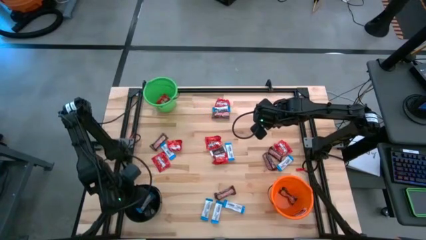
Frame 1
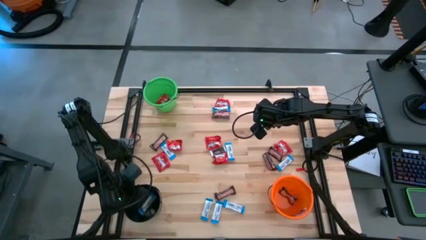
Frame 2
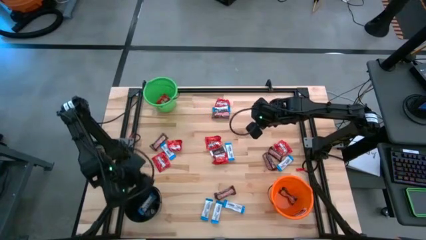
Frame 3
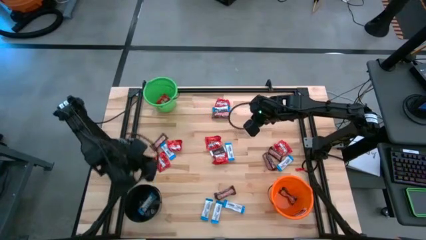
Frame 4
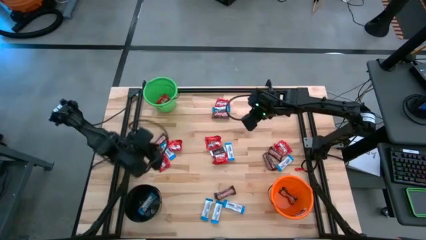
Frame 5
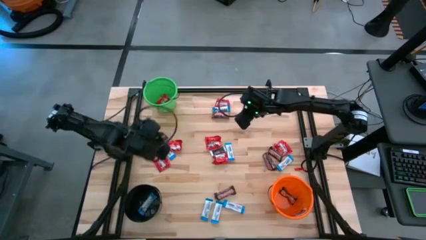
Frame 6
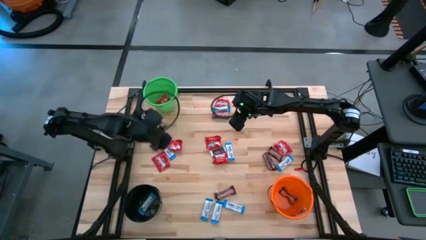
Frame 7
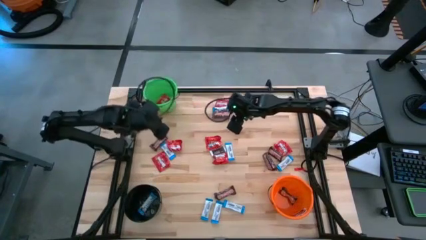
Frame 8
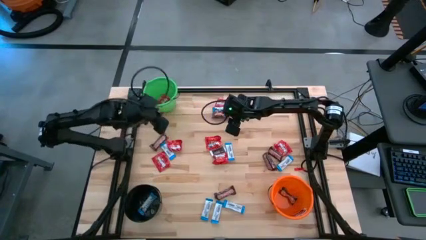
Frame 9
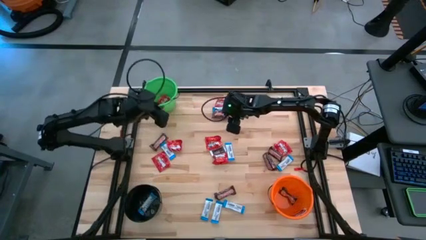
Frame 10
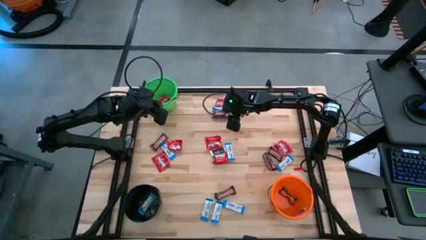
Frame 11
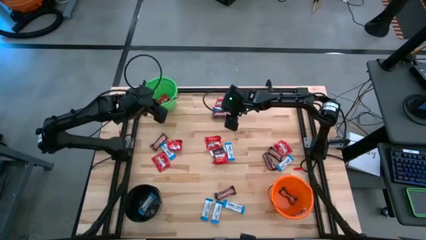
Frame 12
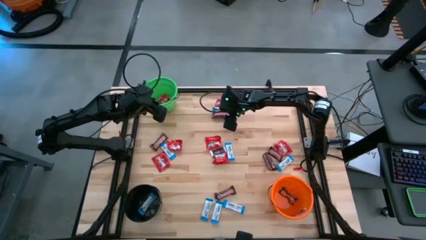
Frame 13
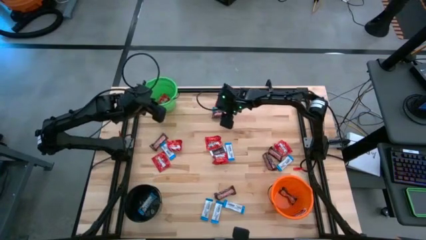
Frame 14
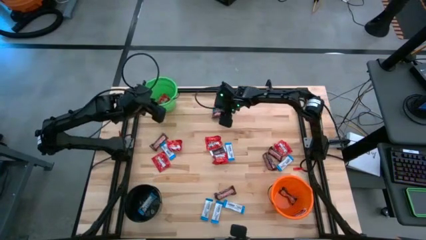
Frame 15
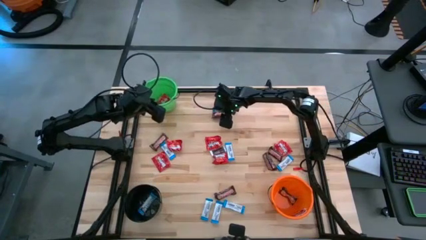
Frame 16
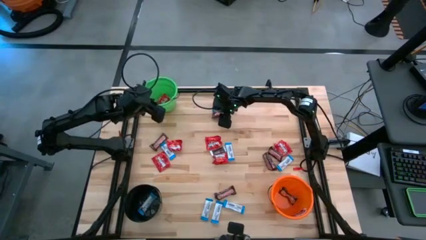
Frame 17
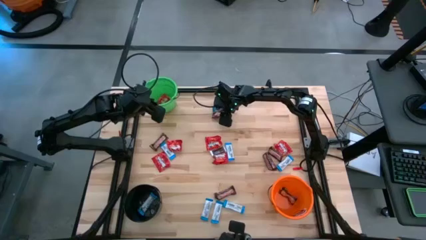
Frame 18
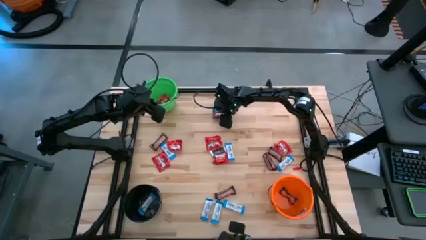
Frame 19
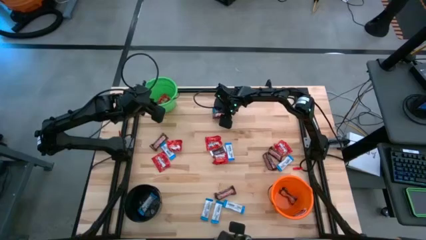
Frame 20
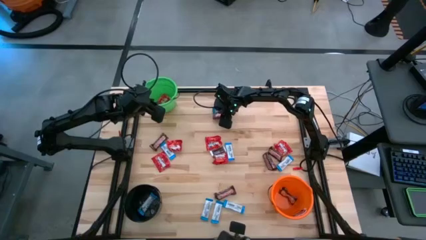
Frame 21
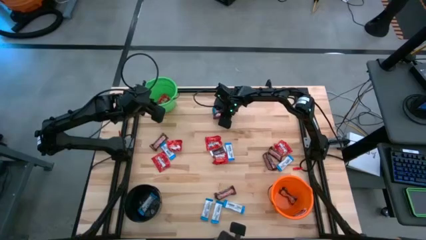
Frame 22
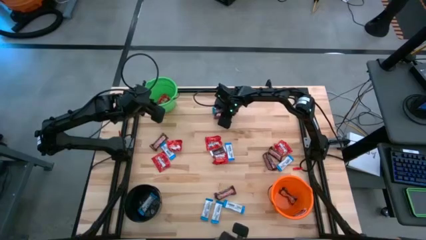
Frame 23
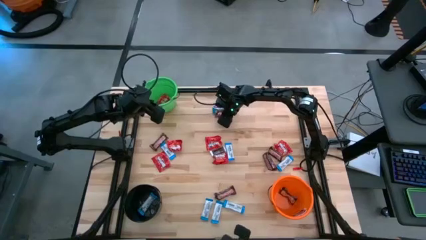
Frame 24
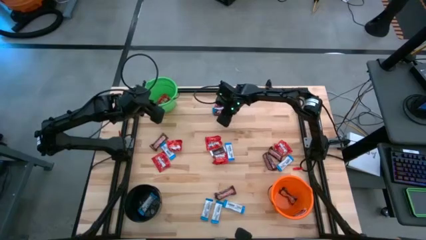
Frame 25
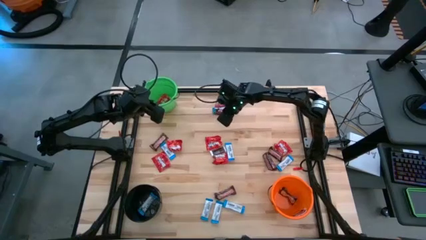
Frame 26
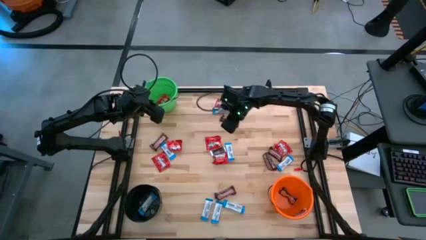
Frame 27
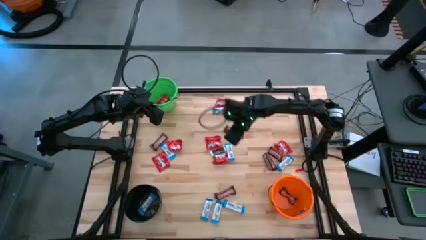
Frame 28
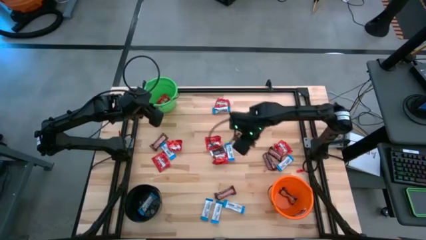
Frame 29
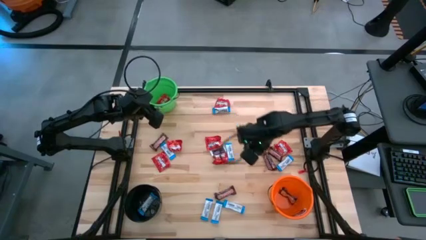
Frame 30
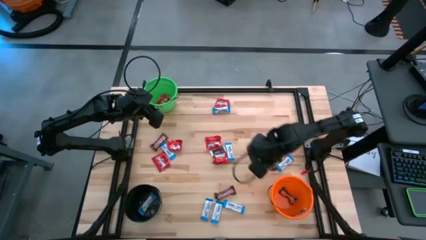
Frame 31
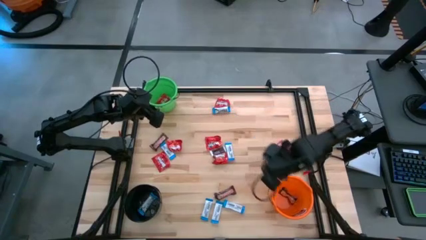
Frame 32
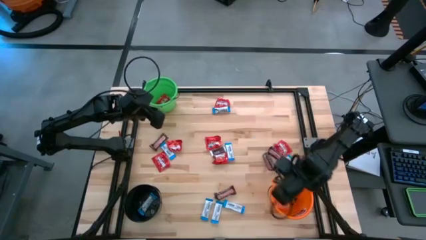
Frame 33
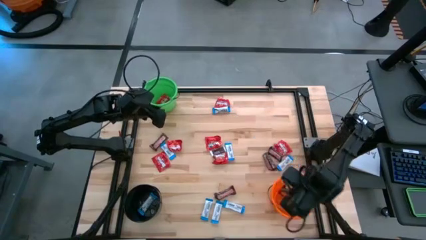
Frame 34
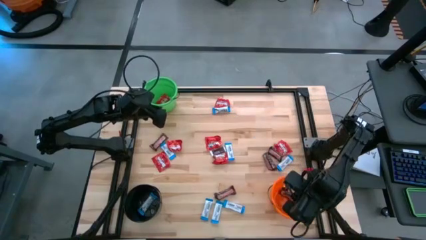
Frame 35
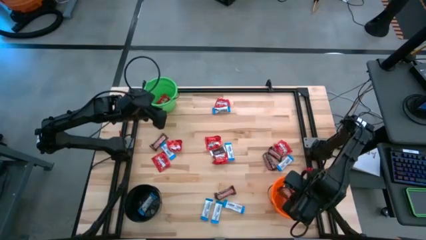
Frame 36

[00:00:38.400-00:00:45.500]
Task: Sort candy
Put the brown chocolate into the orange bucket

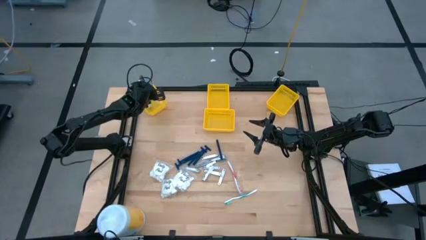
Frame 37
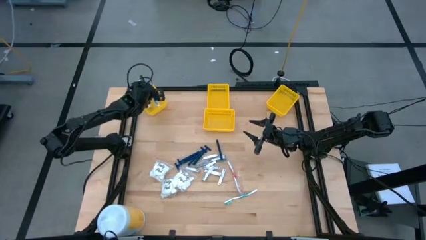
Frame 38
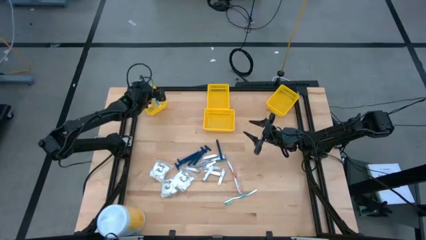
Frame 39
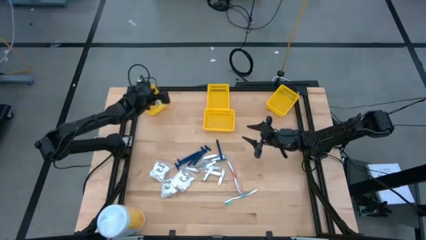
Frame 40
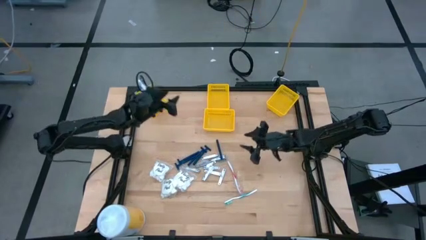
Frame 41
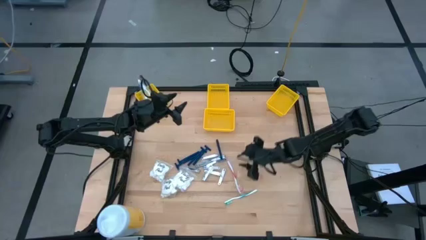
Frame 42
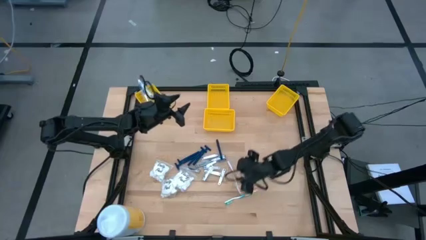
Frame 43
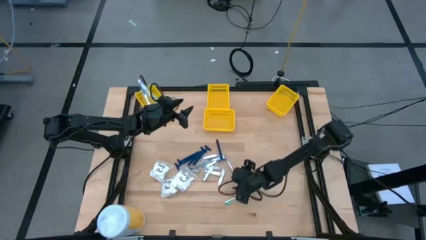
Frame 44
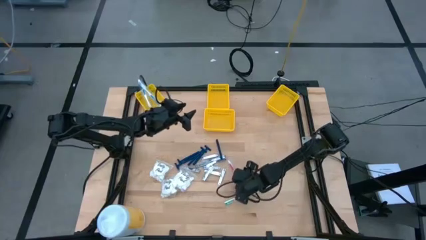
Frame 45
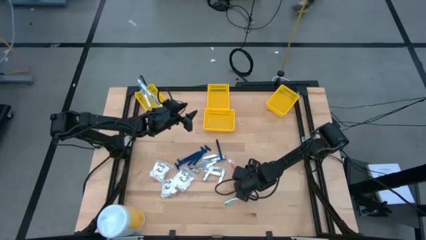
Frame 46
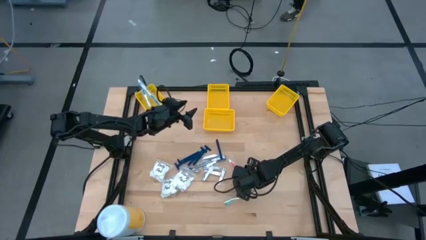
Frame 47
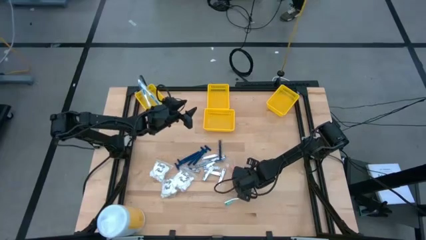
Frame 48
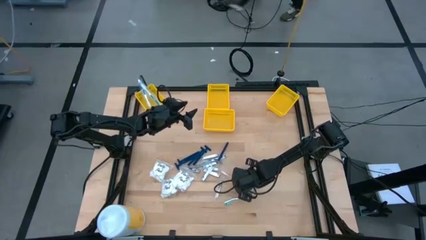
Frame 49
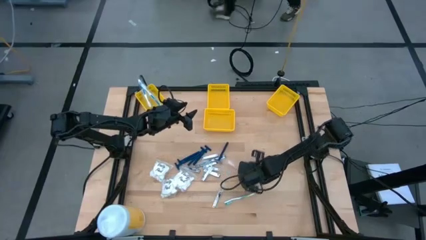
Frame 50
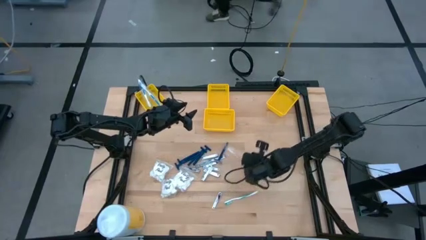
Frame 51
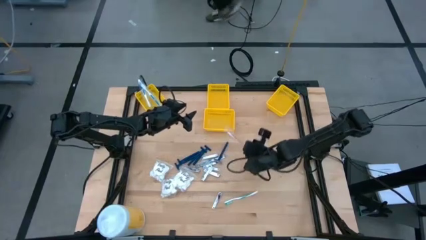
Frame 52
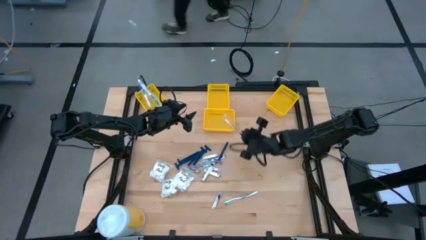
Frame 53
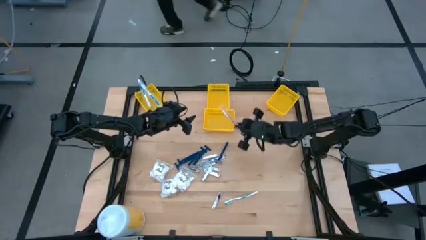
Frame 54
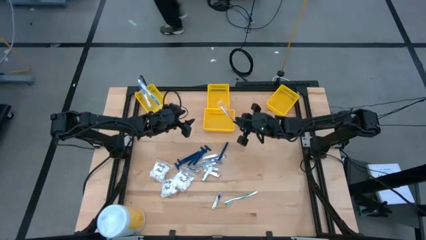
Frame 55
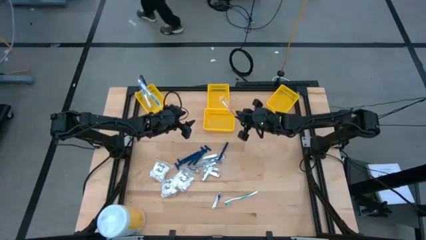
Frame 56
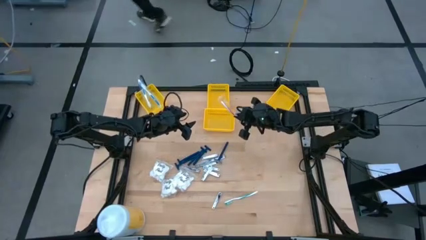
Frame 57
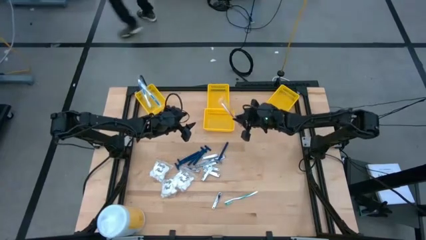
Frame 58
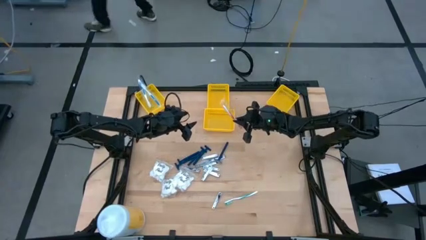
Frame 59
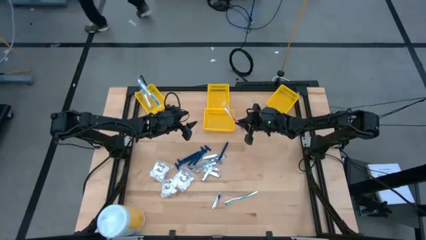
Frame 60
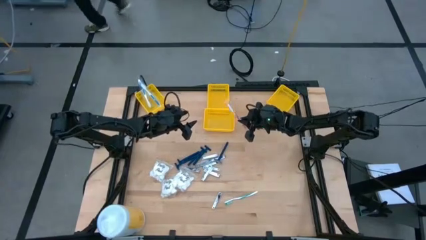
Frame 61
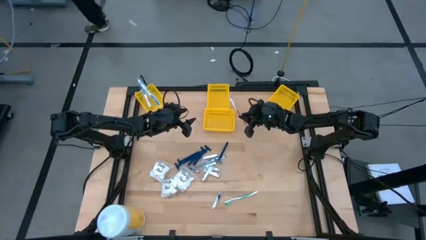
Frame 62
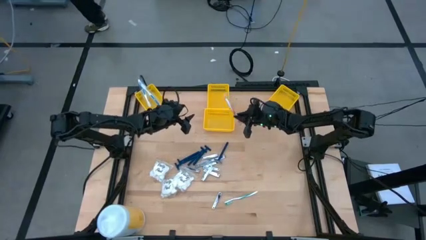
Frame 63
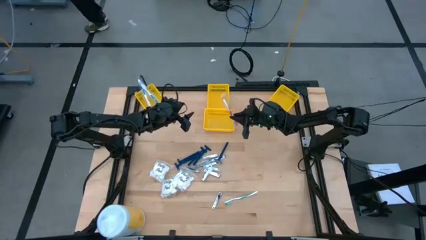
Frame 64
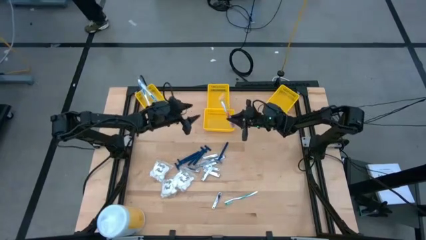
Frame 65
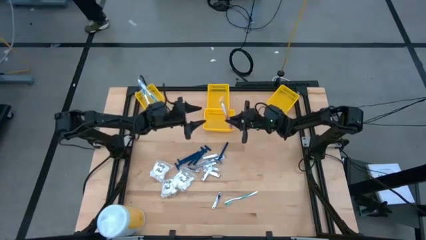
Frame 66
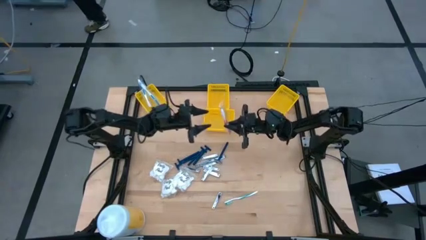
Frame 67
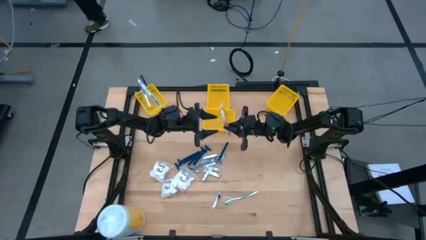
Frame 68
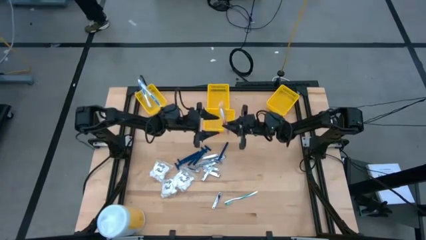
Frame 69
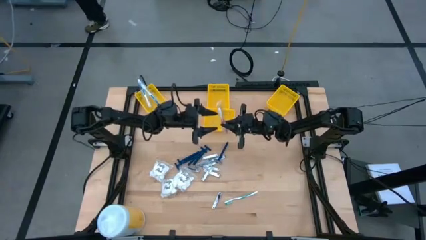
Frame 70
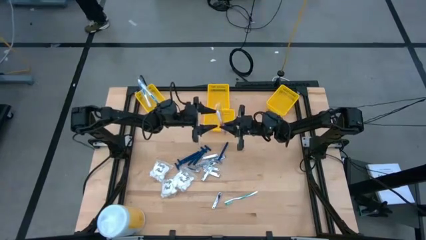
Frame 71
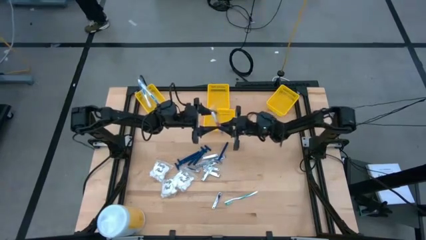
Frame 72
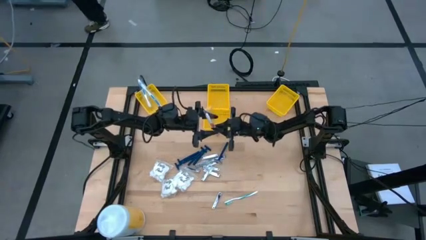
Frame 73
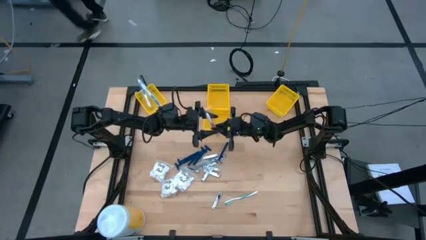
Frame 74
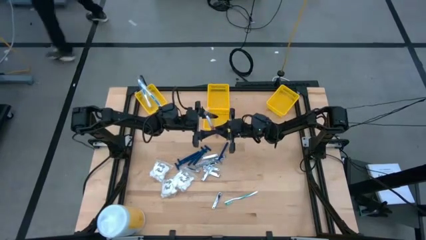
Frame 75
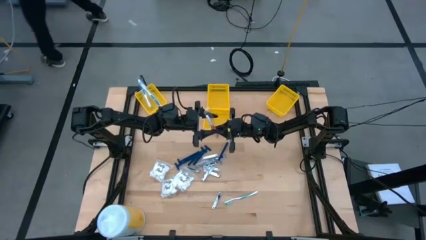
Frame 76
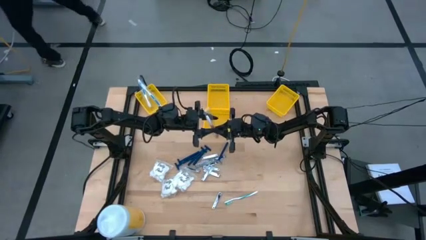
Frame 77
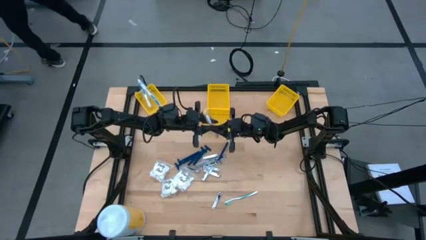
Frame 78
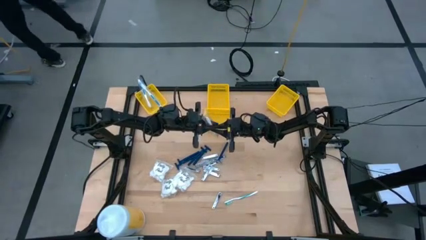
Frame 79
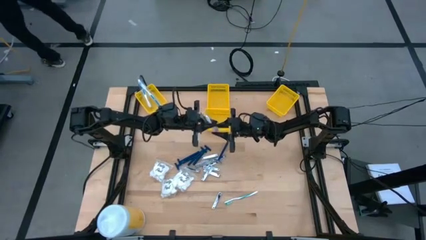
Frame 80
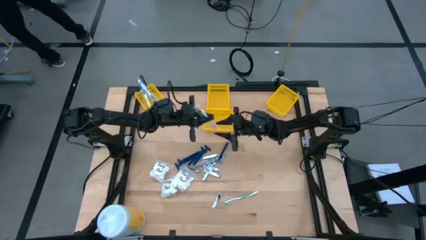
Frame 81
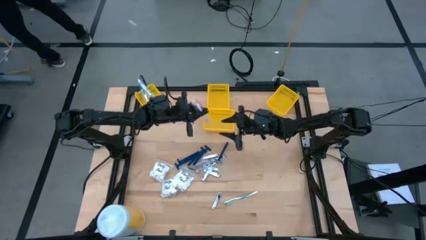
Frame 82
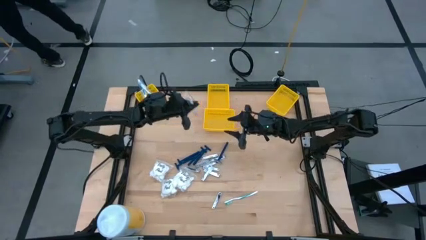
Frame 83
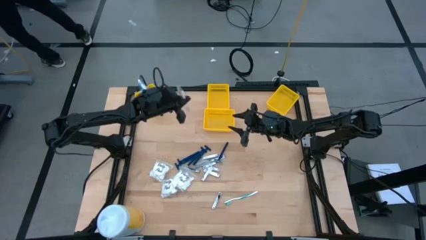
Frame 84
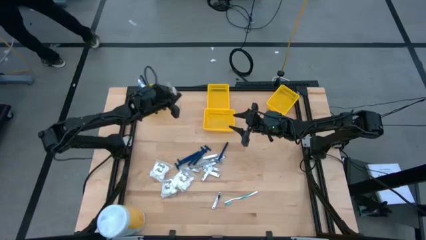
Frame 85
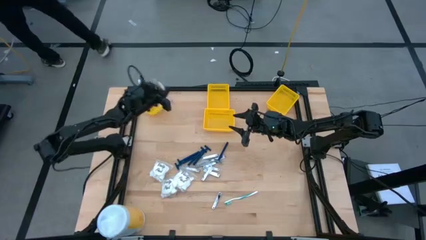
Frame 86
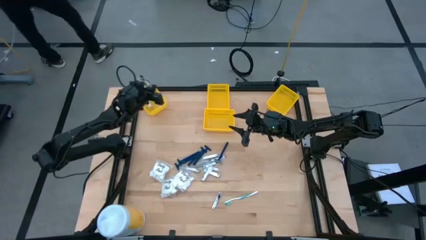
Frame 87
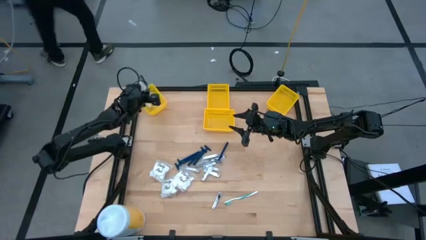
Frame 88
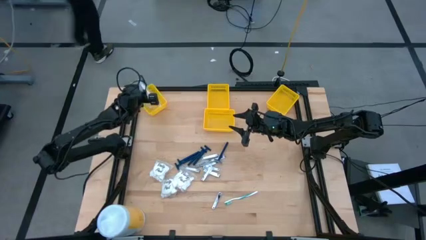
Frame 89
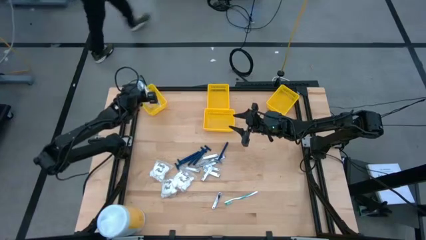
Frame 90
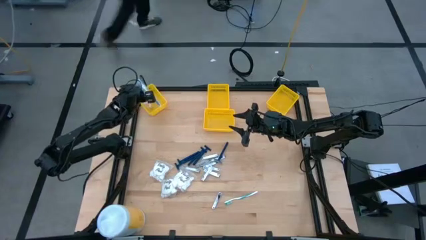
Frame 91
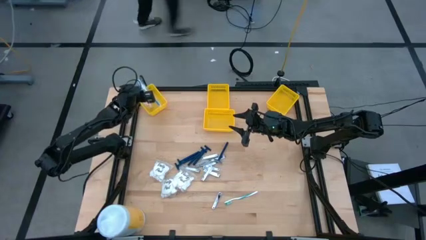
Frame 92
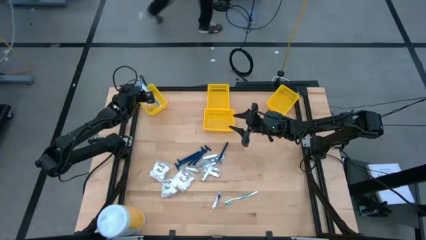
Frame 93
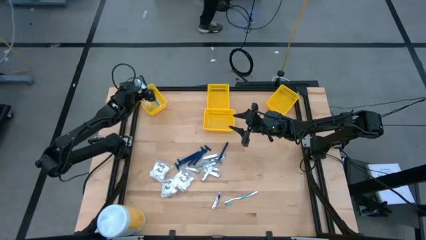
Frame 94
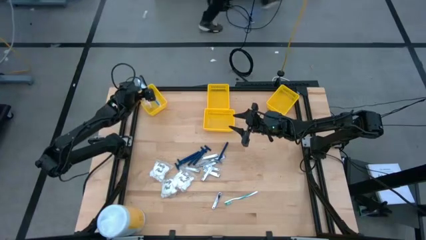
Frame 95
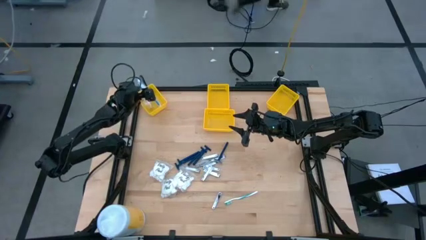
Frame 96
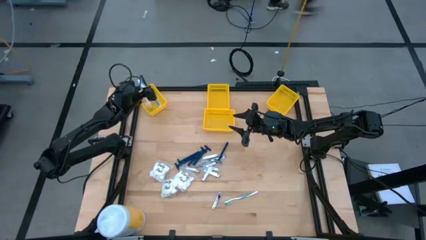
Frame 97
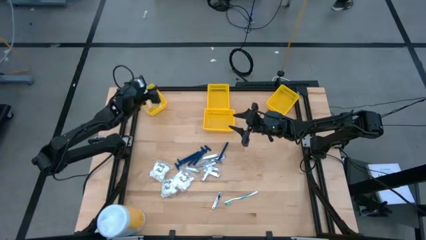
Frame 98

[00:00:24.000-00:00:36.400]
Task: Pick & Place Travel size toiletries
Put the orange toothbrush into the left yellow bin
